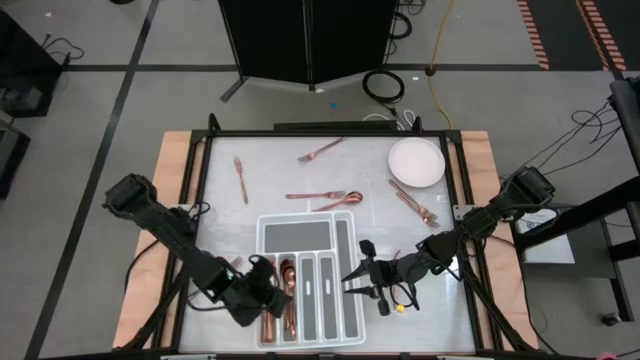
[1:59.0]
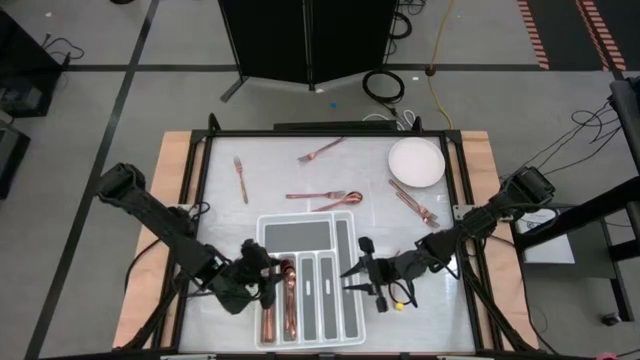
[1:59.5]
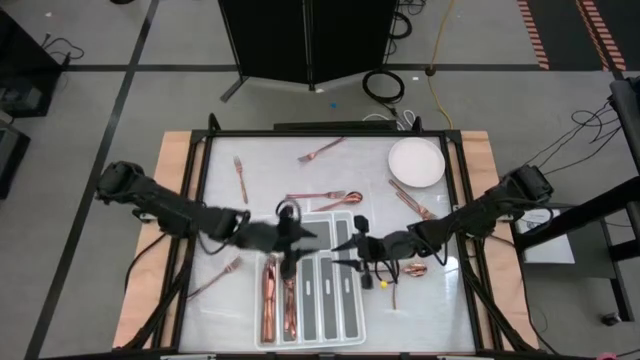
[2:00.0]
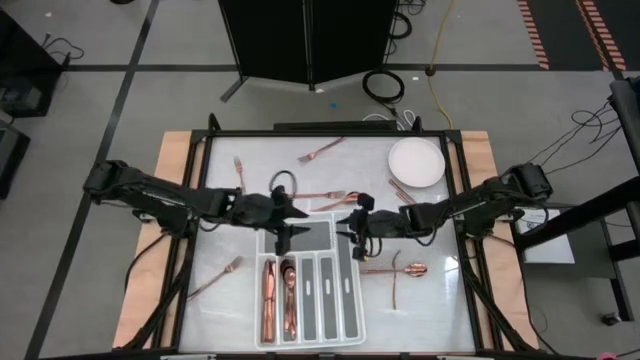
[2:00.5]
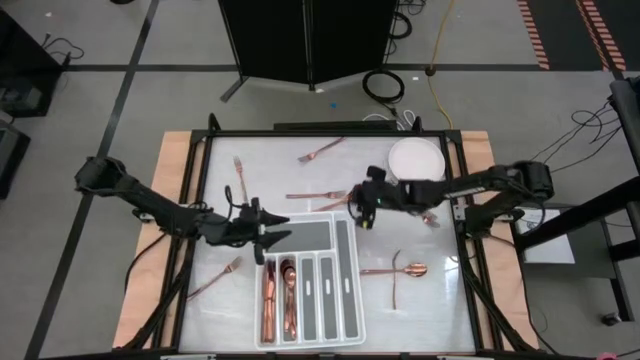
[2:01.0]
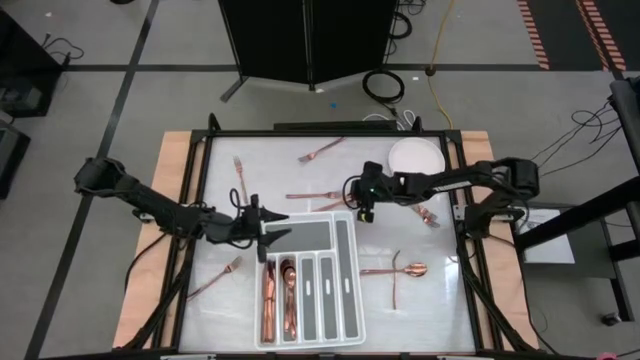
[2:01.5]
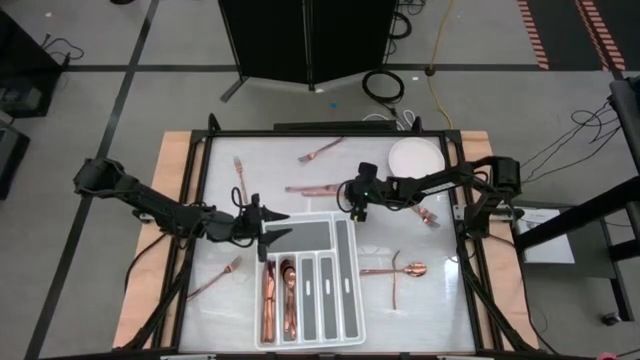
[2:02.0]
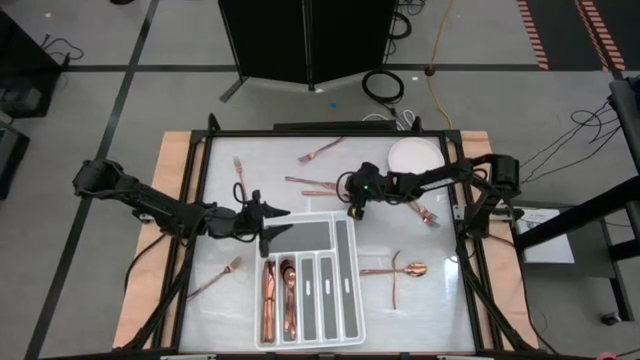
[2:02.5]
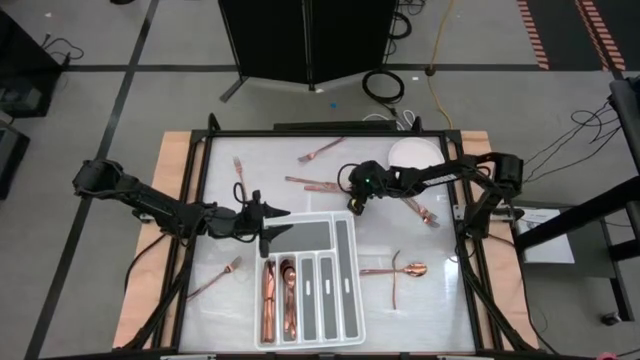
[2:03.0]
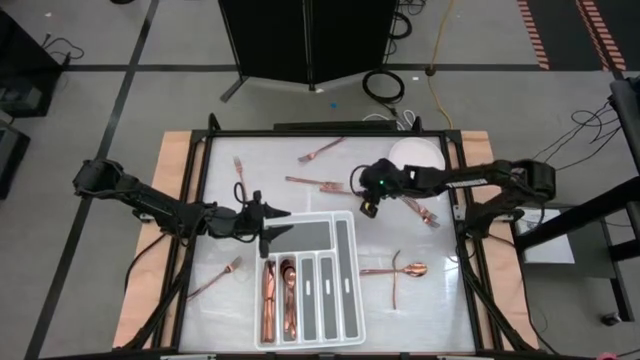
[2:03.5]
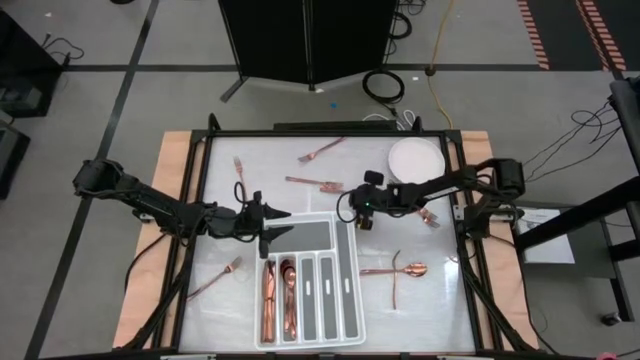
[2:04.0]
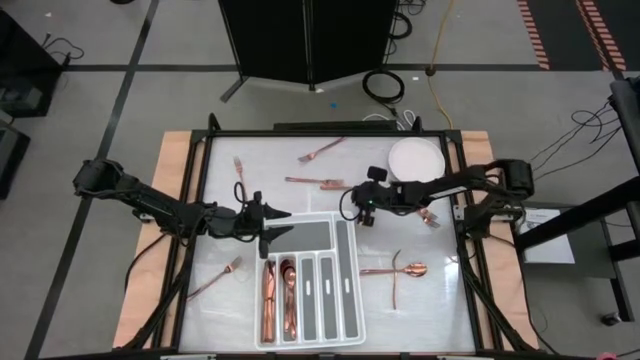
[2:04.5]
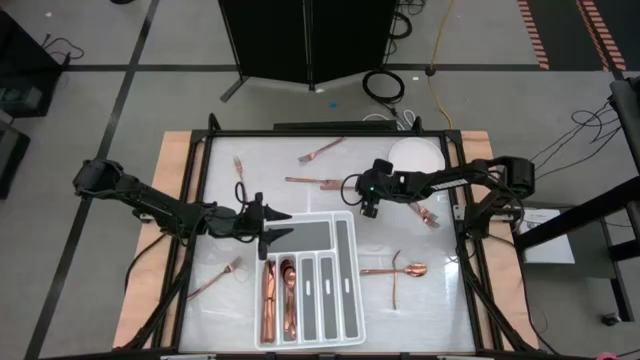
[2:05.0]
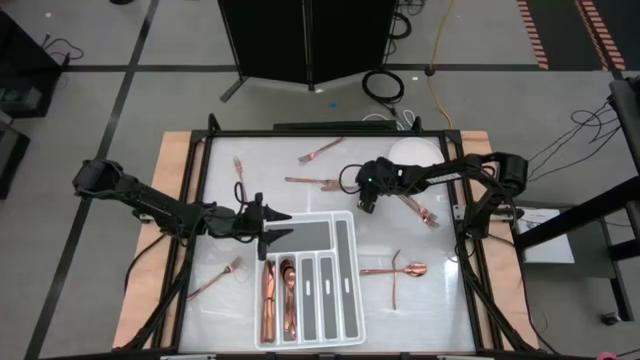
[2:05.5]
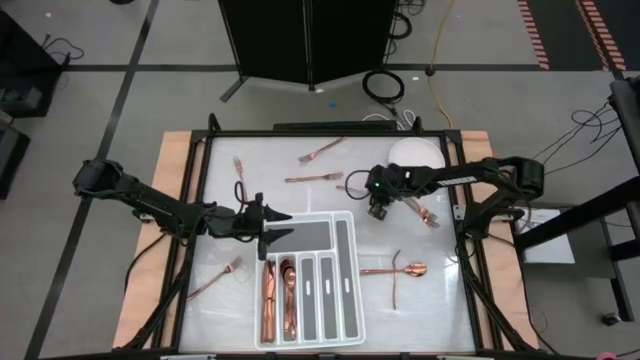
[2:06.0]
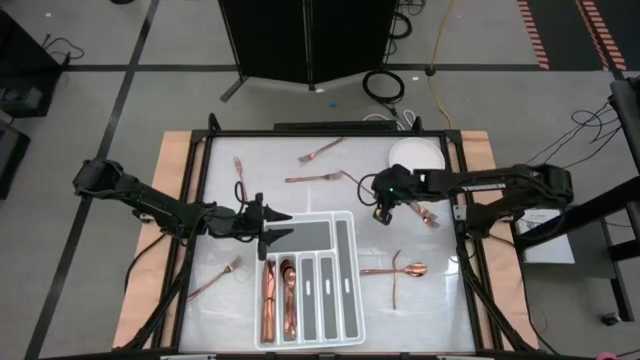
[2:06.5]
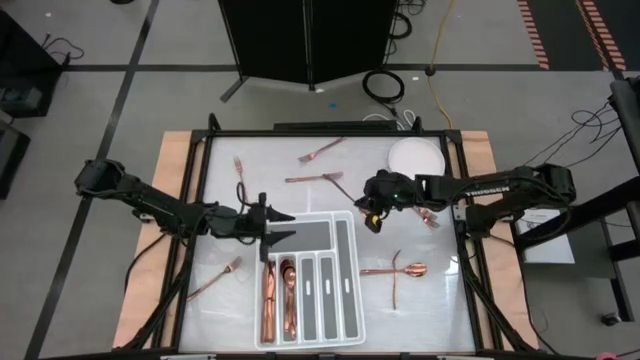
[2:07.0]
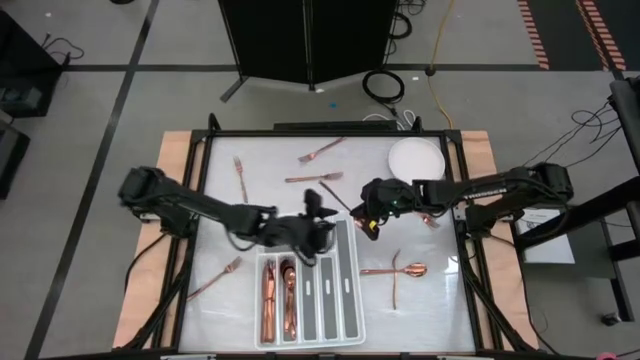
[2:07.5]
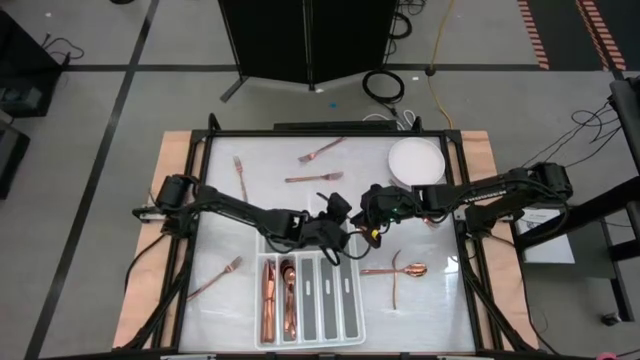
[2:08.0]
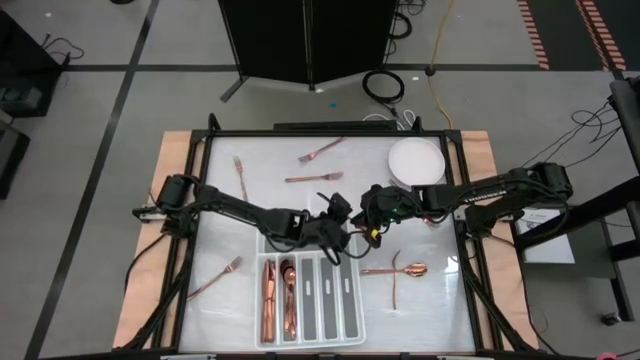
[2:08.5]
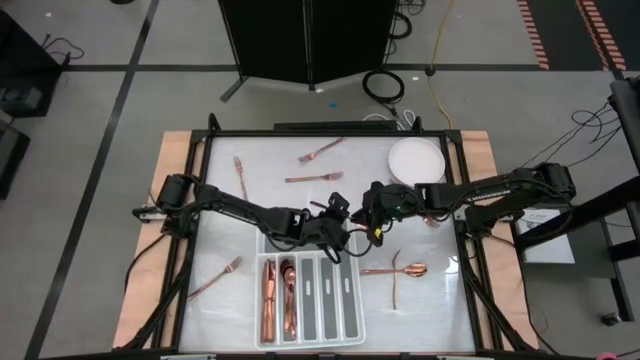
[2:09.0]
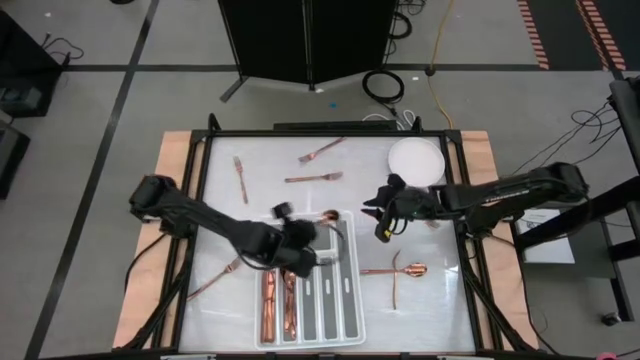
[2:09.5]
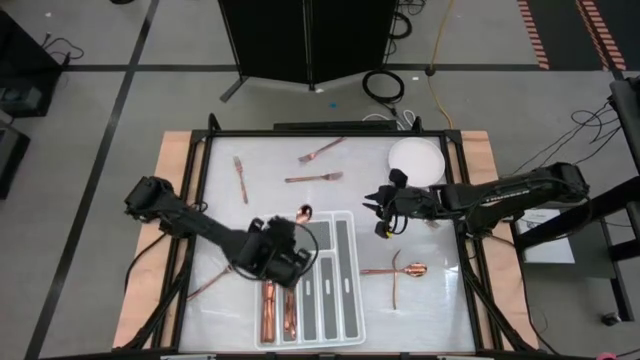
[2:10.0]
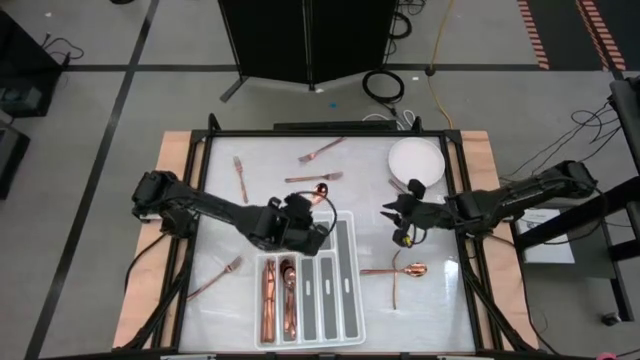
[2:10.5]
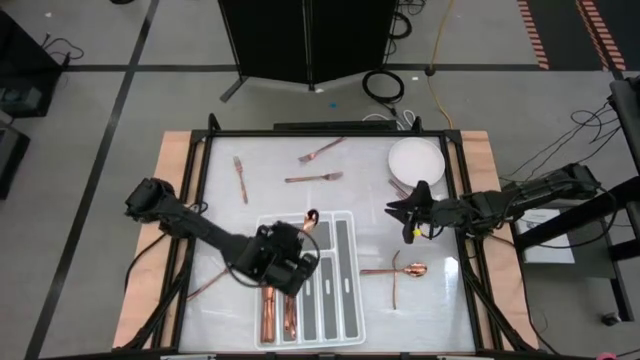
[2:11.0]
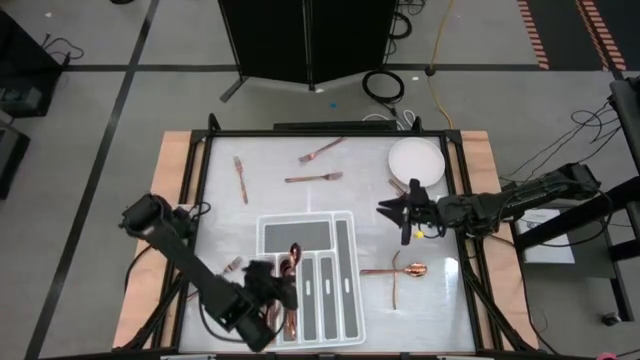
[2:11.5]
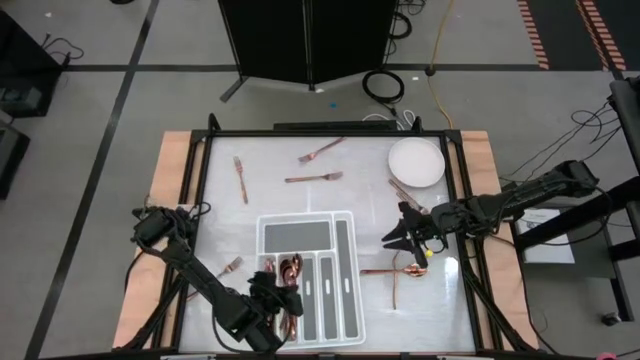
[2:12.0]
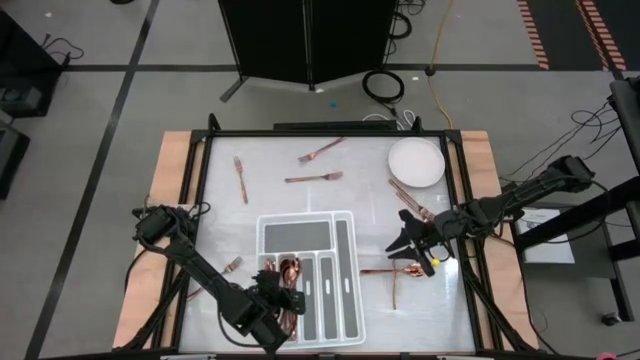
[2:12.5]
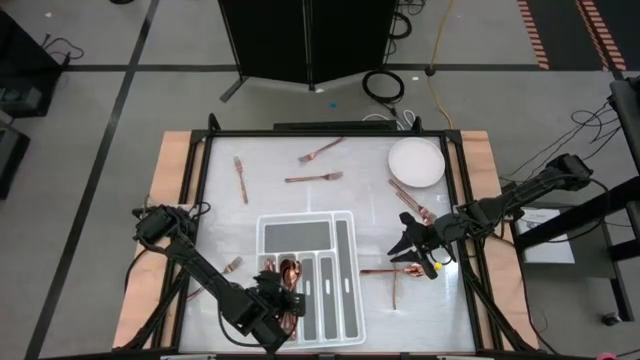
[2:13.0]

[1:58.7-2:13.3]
Task: Sort silverware
Put the top spoon into the silverware tray

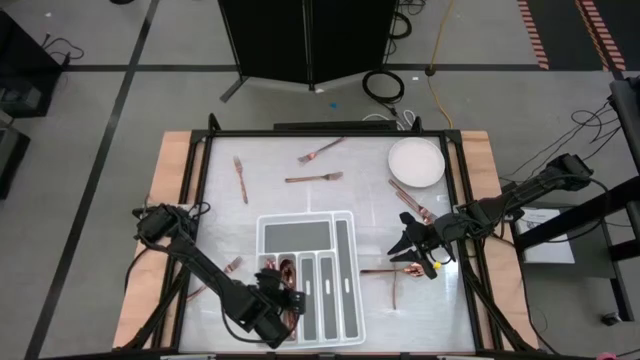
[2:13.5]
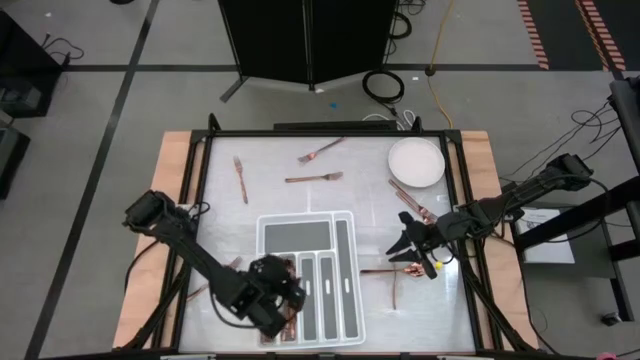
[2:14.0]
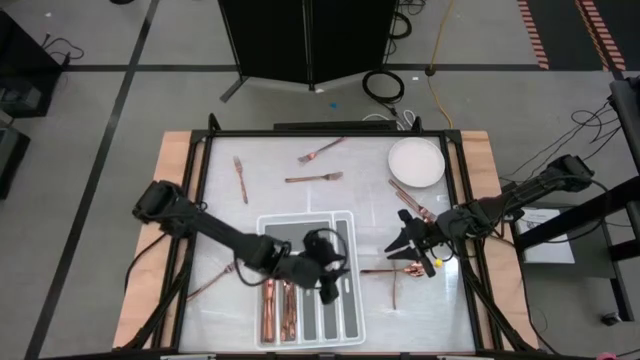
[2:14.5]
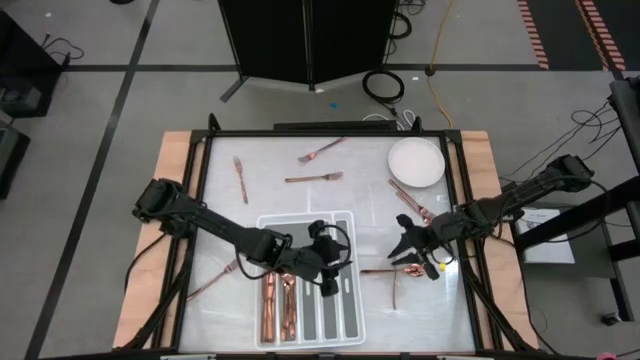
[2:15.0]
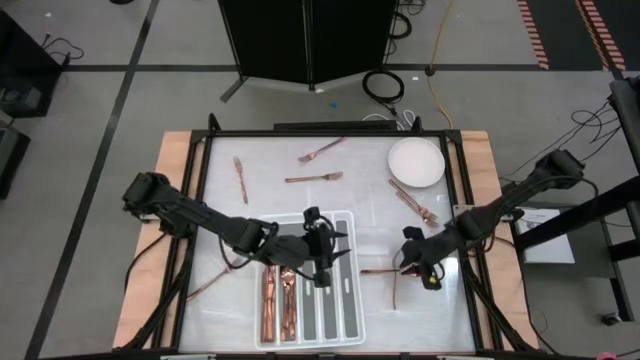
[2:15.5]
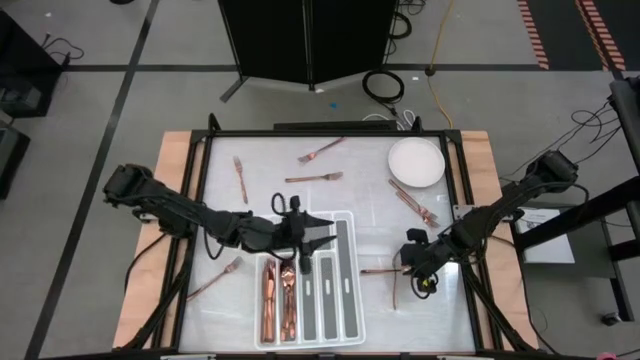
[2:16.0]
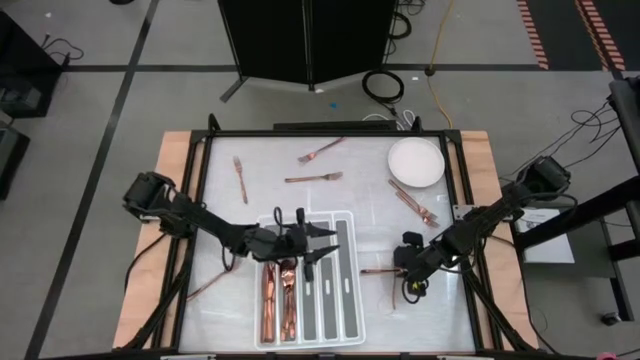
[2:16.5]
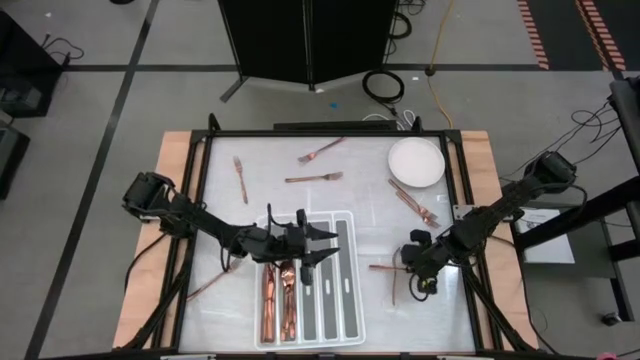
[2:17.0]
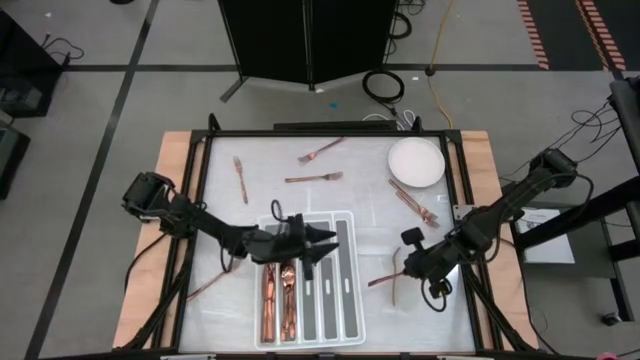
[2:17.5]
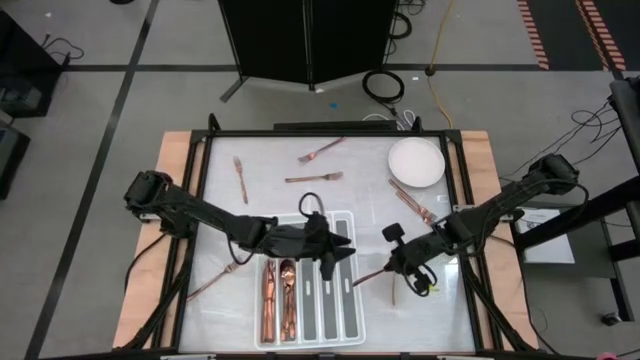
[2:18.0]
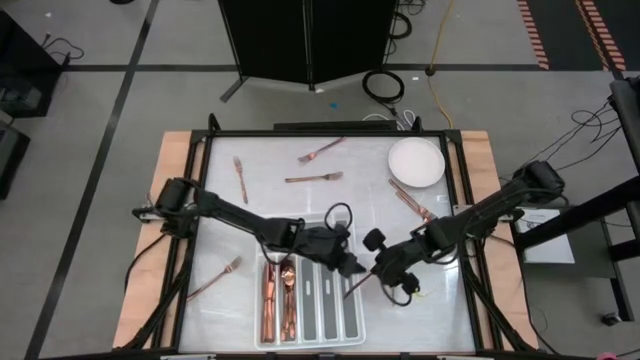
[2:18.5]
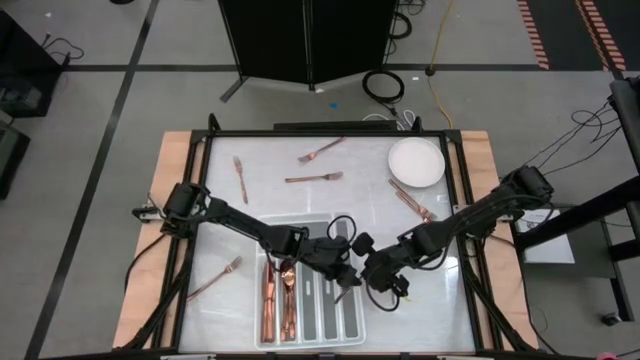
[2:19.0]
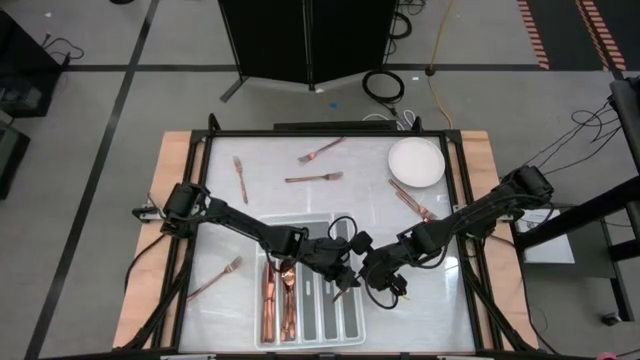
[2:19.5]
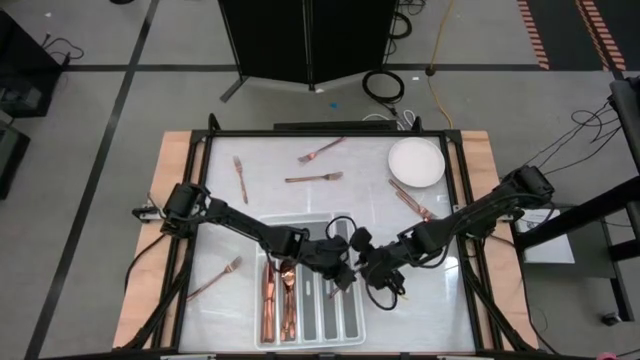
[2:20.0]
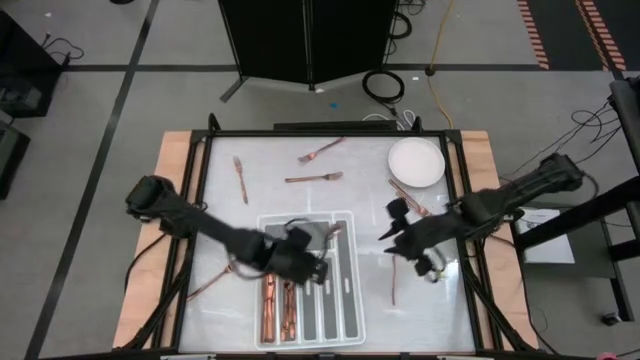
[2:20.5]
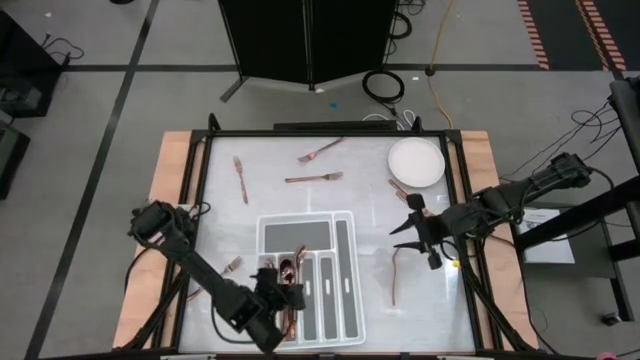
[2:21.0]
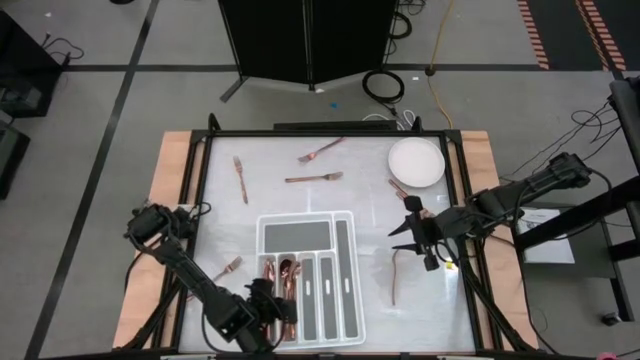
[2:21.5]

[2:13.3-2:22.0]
Put the spoon into the silverware tray
